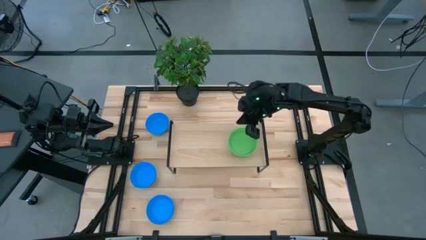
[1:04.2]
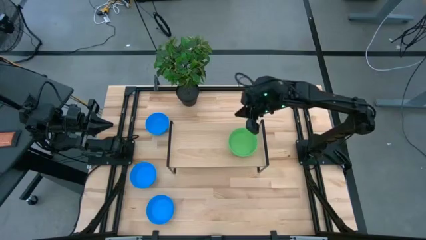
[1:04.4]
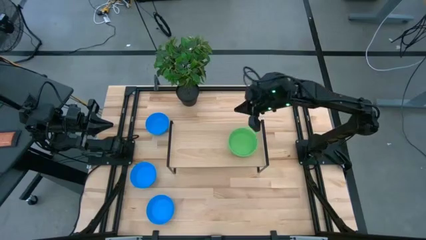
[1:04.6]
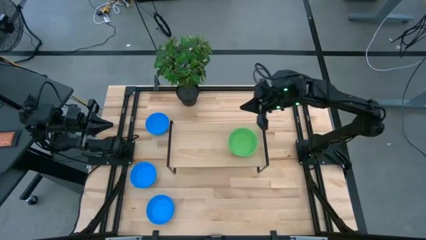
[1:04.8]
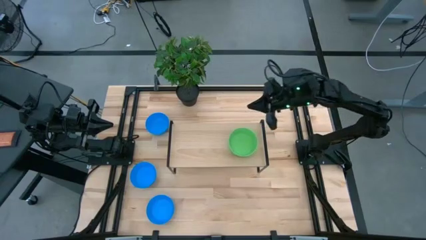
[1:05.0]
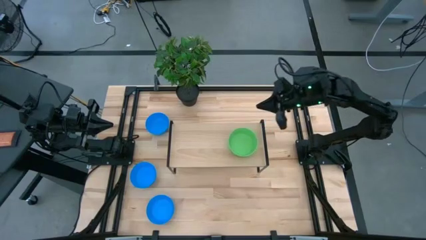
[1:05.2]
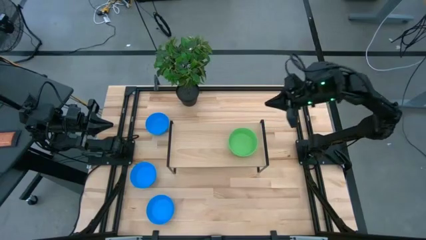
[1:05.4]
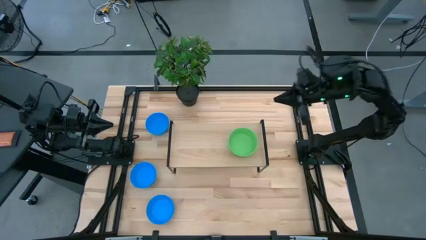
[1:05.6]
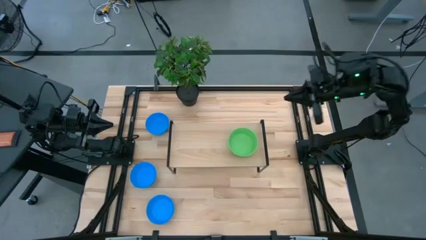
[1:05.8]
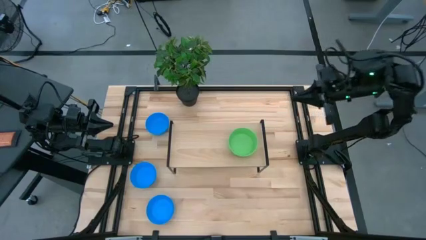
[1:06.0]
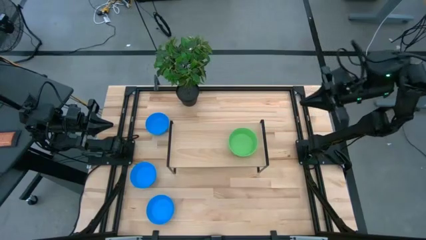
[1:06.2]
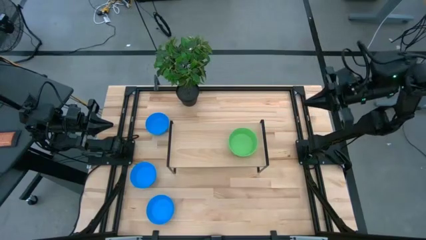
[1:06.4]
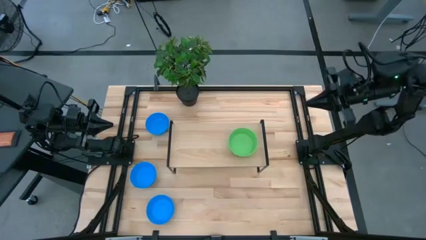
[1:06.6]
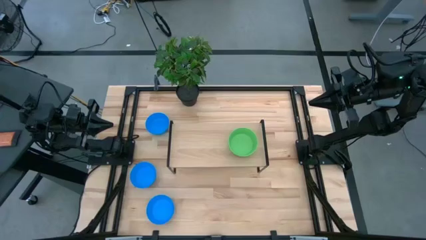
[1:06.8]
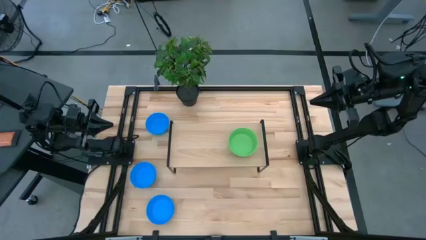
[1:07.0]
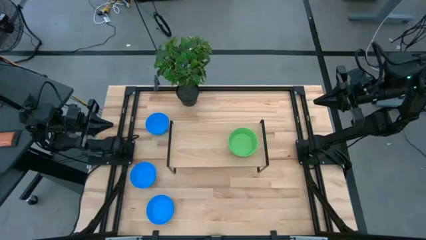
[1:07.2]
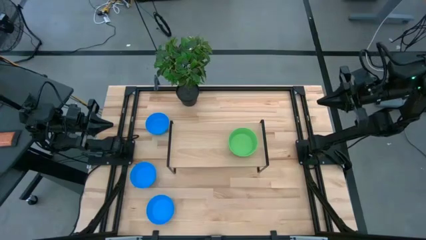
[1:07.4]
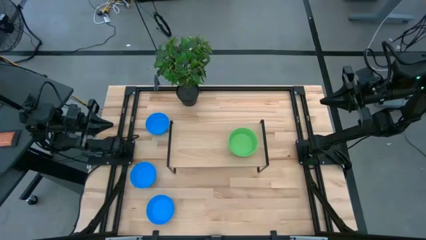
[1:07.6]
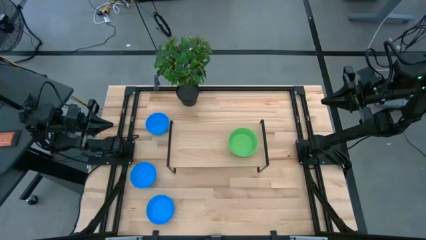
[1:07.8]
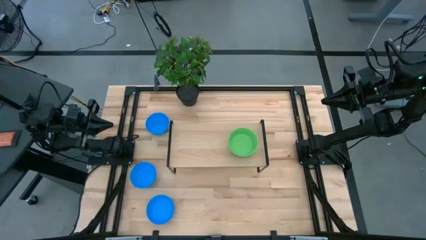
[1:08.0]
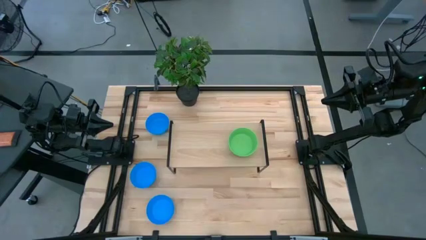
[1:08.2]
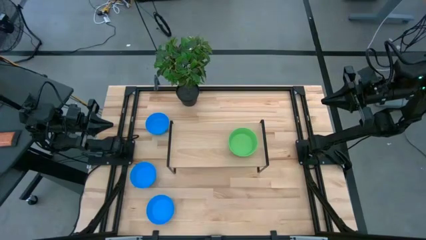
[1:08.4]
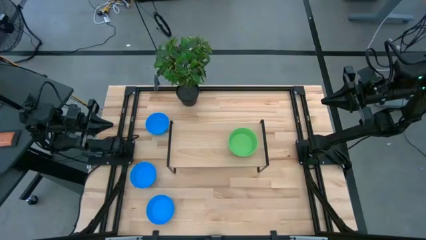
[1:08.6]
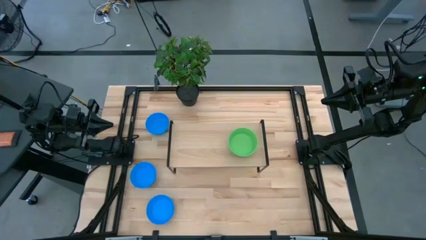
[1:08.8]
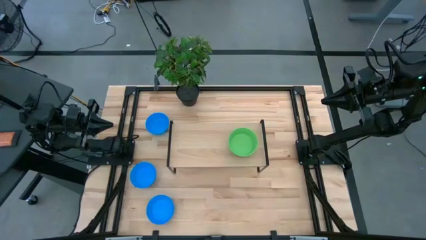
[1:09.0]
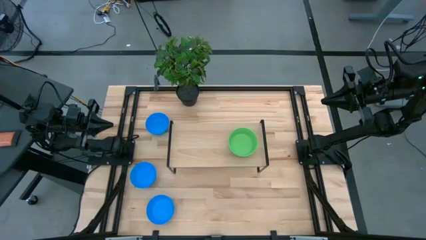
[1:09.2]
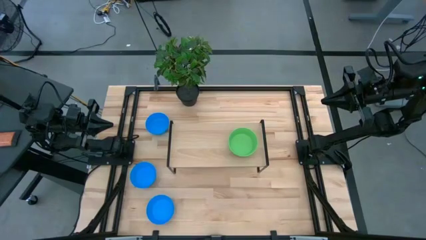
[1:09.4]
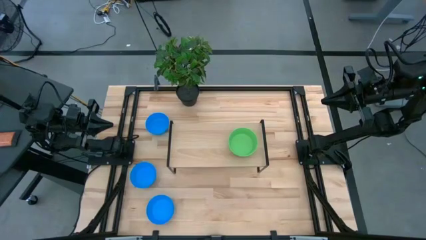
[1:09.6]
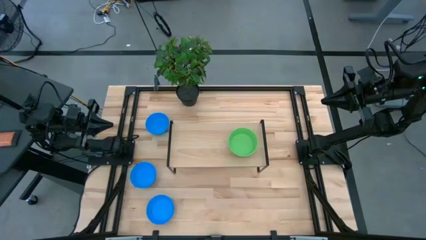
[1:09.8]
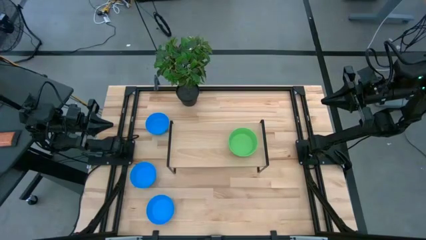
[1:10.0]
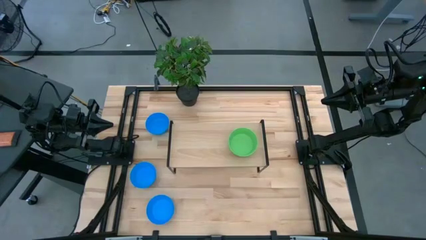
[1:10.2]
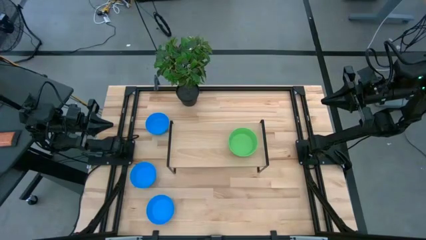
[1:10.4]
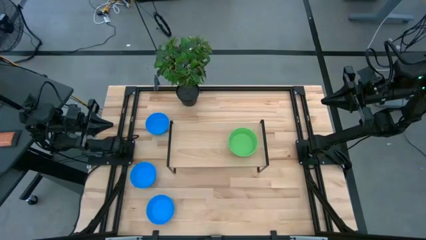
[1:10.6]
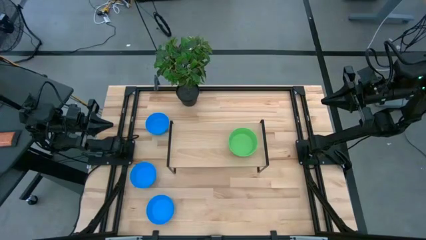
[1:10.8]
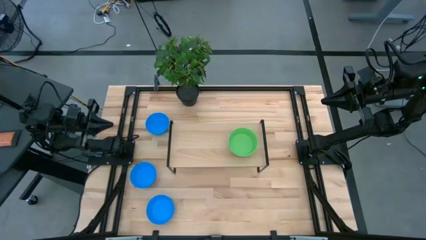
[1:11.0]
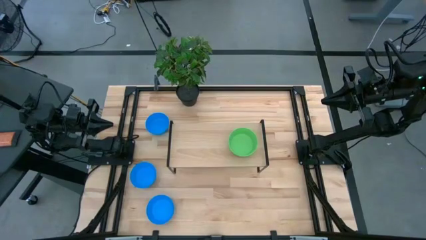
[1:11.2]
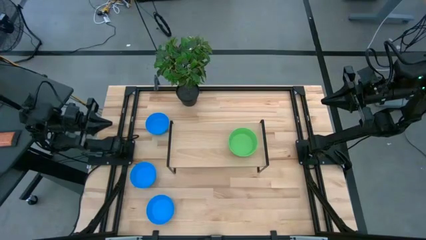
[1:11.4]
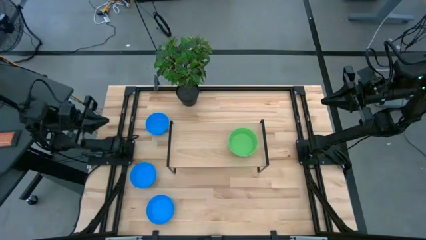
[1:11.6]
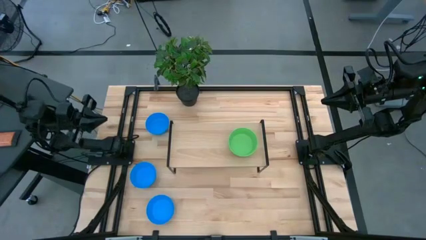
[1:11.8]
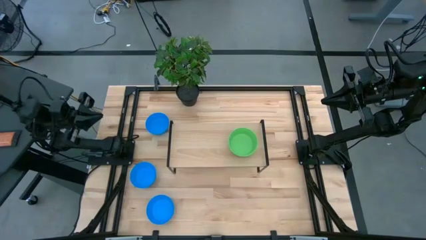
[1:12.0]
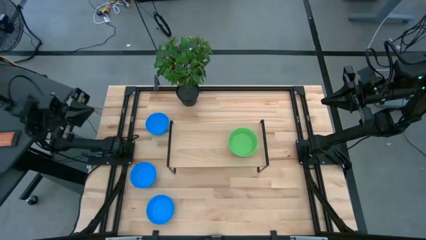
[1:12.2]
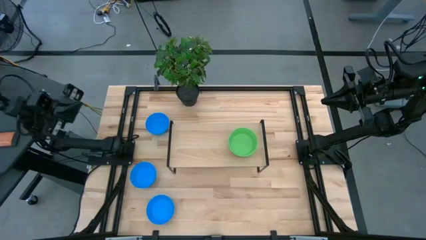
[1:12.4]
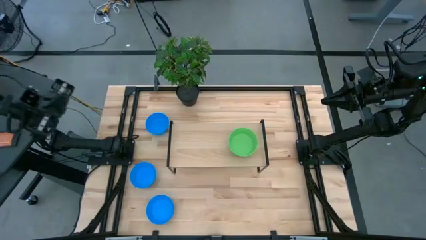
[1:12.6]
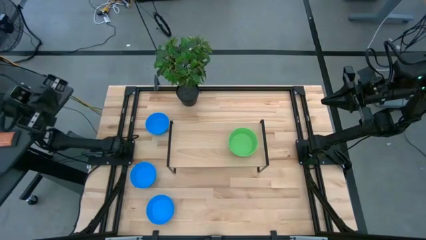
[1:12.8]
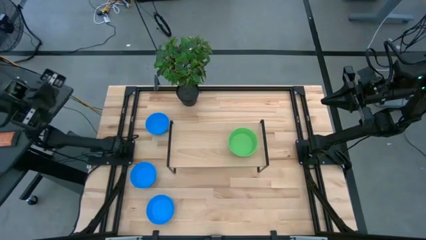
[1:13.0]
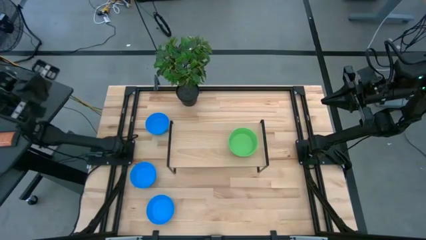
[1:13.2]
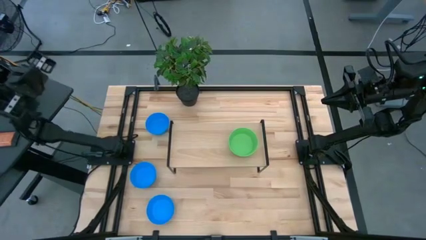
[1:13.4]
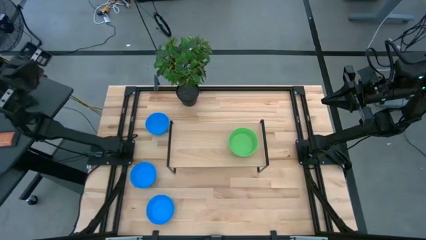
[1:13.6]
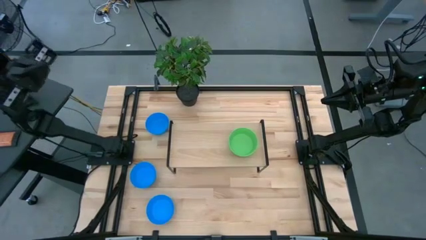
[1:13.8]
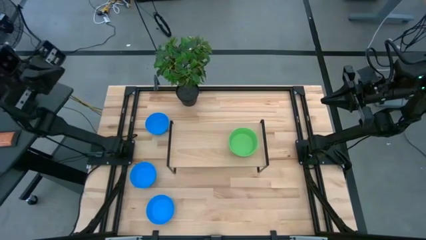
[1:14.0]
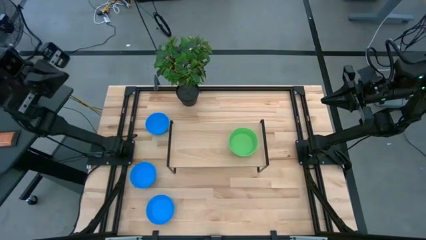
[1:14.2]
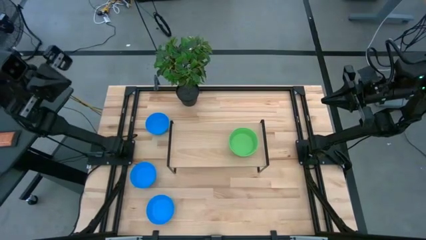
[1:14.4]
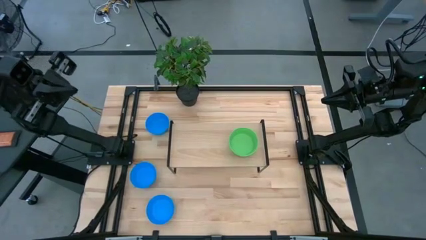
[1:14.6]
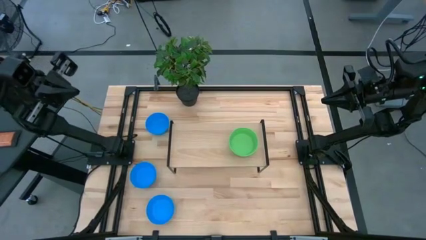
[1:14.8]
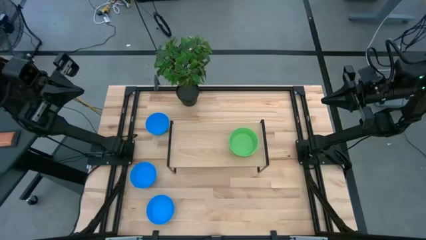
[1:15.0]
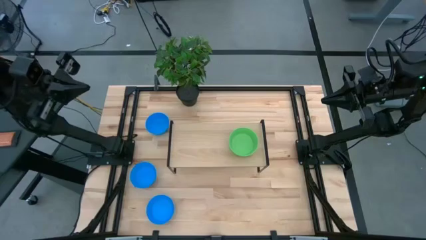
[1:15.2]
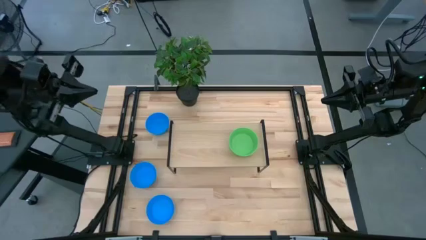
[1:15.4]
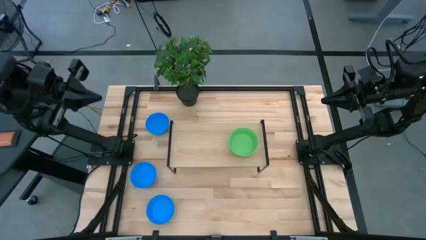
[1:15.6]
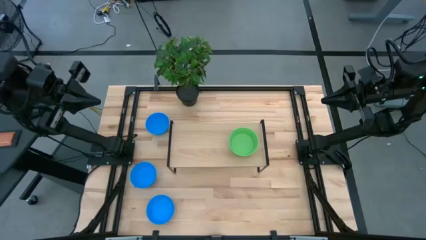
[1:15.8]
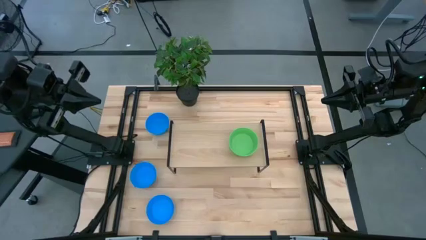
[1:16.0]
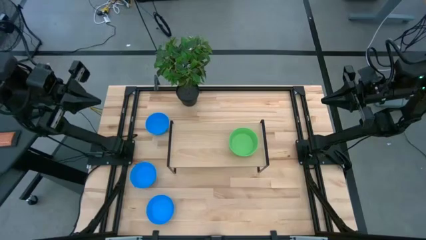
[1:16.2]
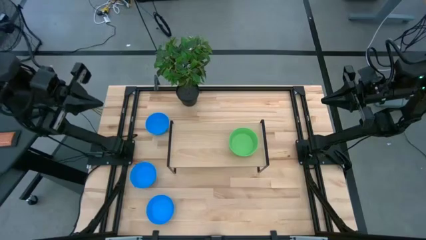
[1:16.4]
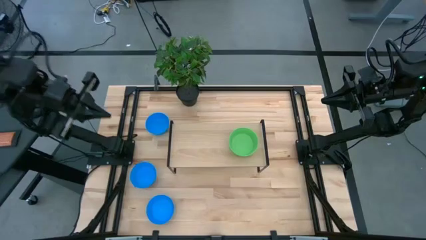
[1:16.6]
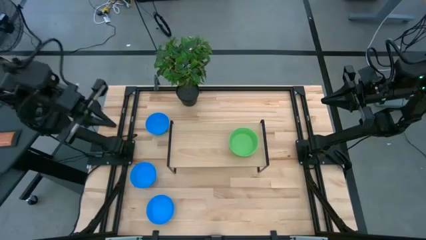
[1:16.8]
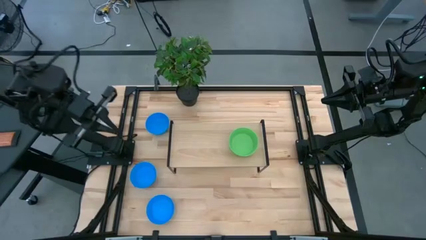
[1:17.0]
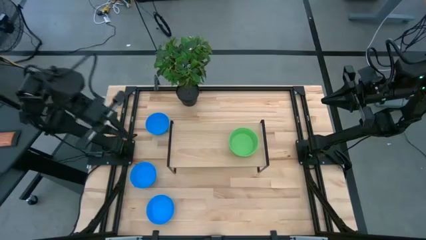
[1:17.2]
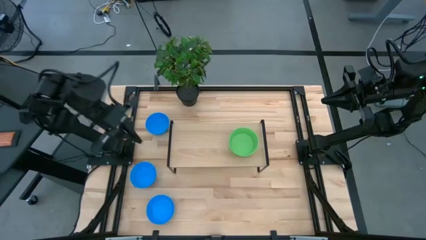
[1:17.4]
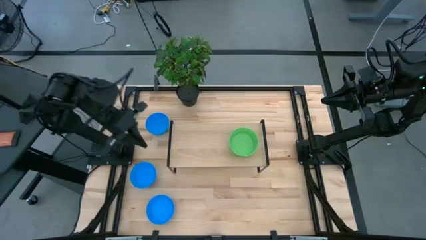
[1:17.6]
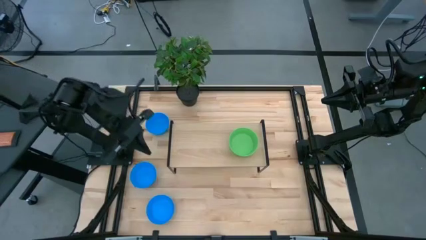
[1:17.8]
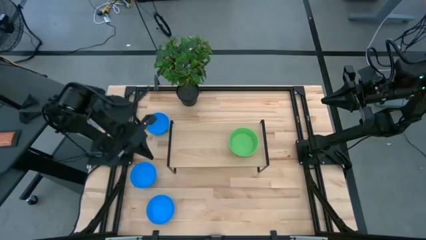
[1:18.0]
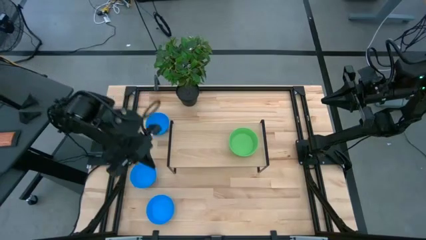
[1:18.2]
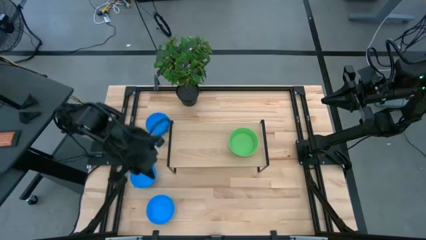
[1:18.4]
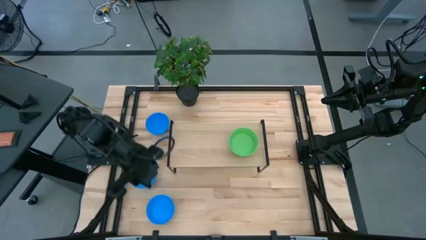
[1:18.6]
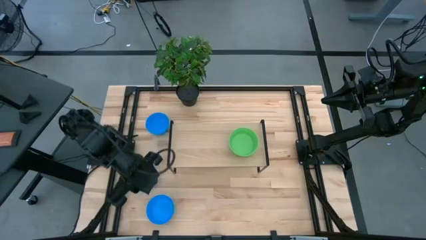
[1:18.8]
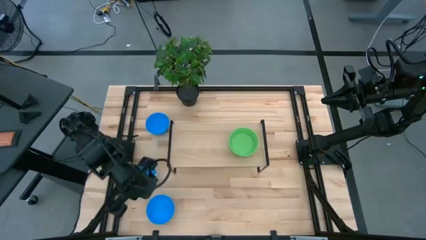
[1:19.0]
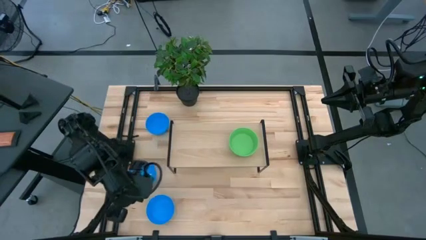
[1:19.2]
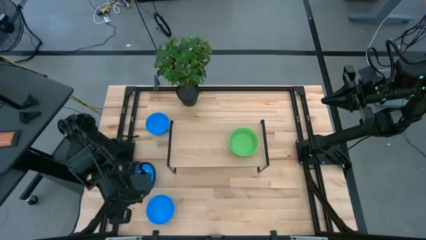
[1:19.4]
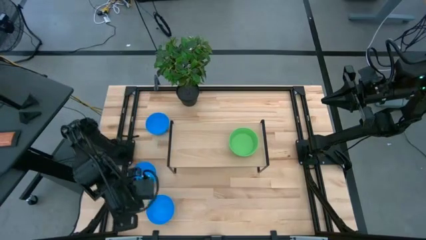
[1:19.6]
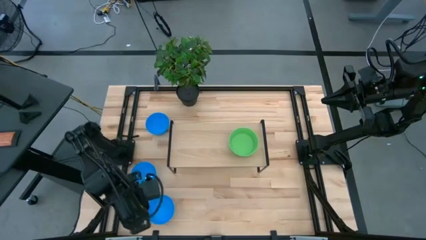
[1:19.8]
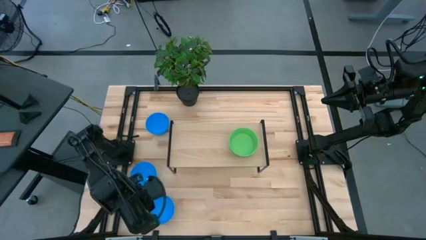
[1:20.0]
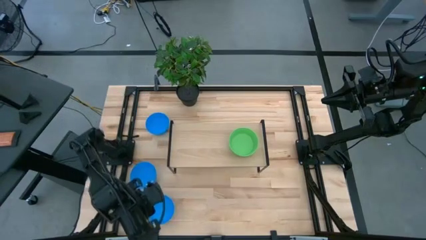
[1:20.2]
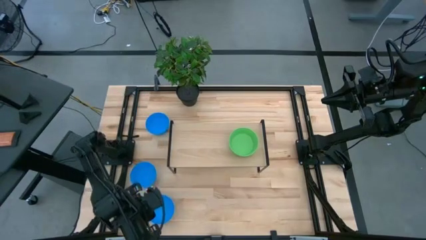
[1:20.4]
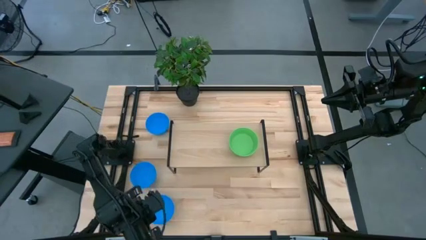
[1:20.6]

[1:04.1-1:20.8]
Task: Pick & Place Mini bowls
Put the bottom blue bowl on the shelf
